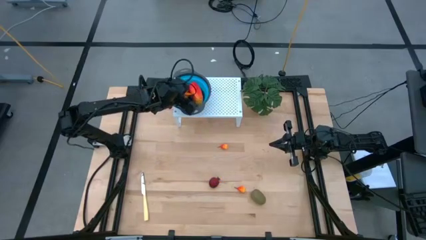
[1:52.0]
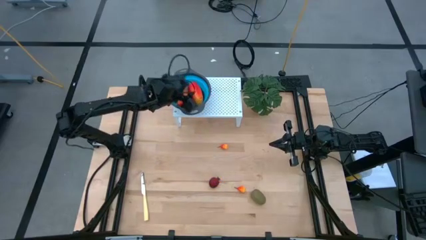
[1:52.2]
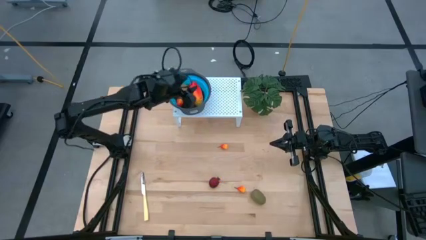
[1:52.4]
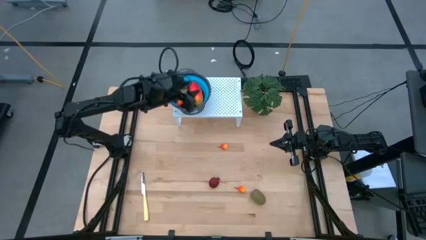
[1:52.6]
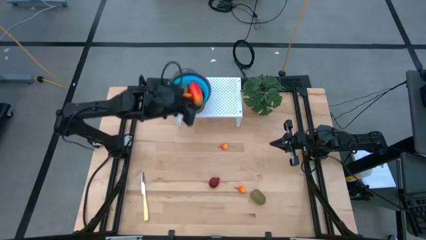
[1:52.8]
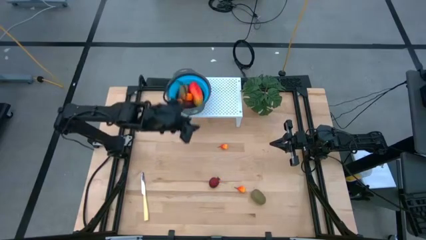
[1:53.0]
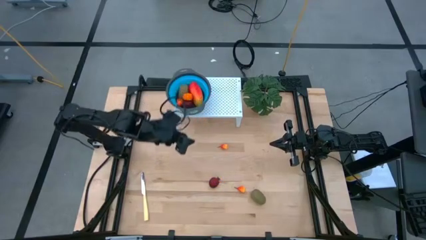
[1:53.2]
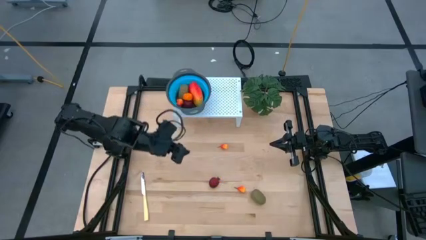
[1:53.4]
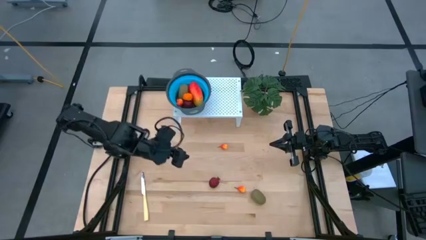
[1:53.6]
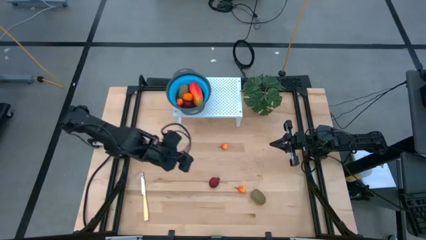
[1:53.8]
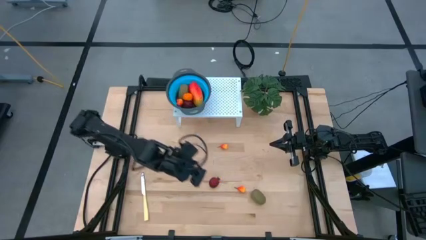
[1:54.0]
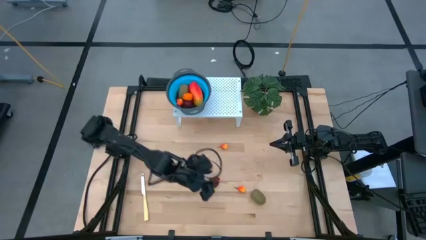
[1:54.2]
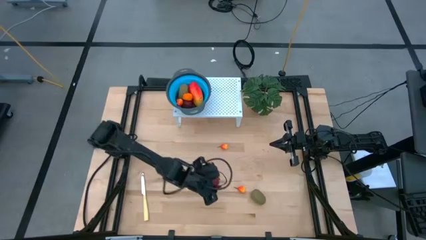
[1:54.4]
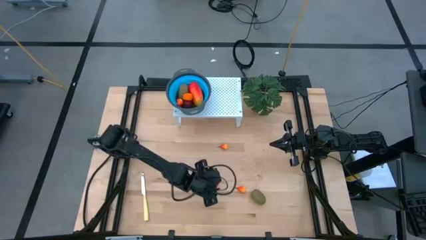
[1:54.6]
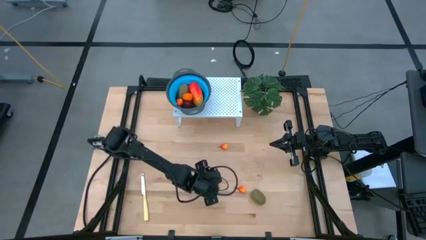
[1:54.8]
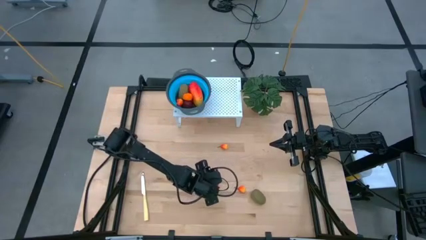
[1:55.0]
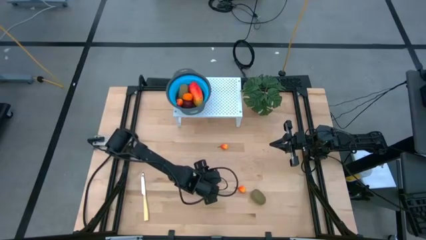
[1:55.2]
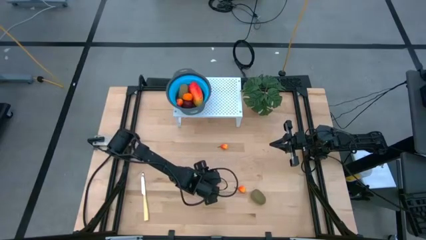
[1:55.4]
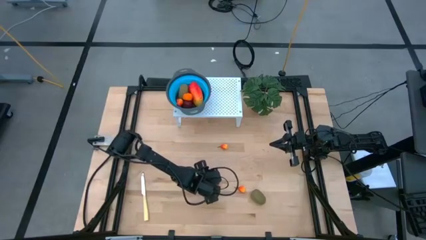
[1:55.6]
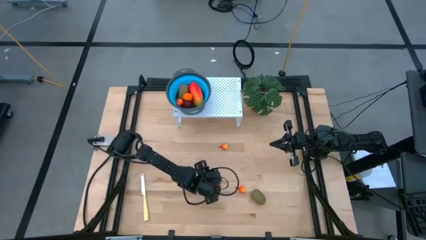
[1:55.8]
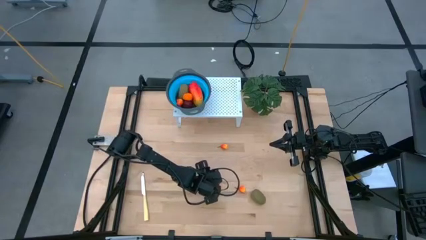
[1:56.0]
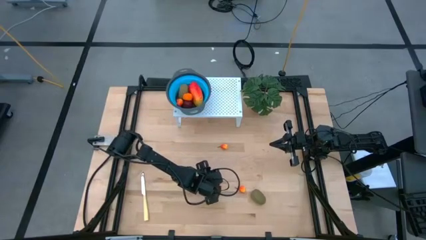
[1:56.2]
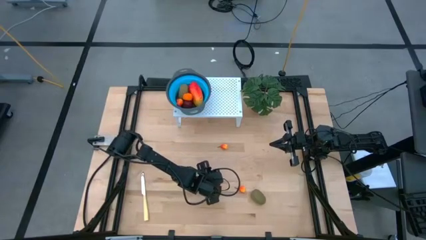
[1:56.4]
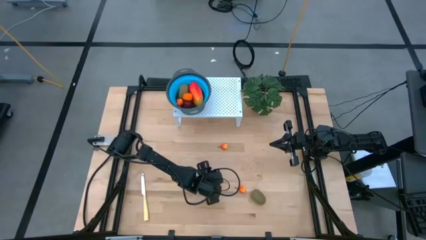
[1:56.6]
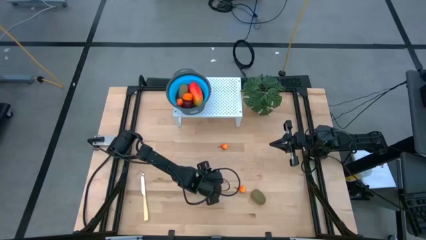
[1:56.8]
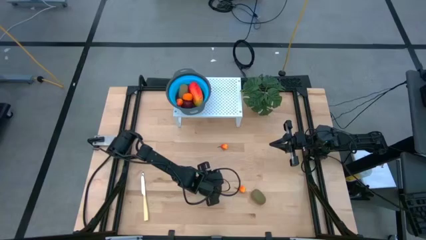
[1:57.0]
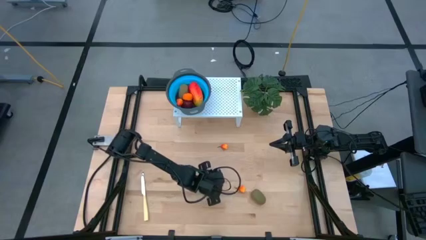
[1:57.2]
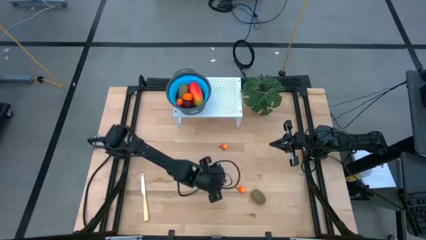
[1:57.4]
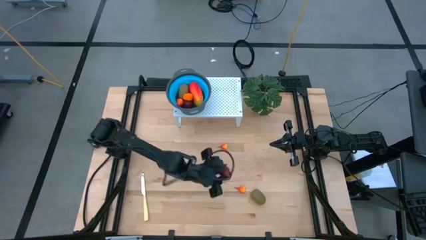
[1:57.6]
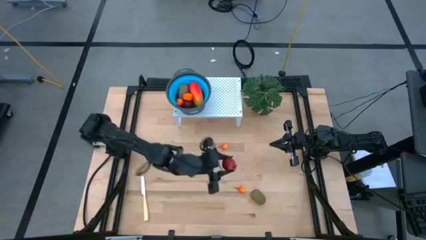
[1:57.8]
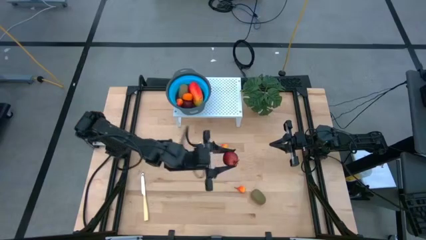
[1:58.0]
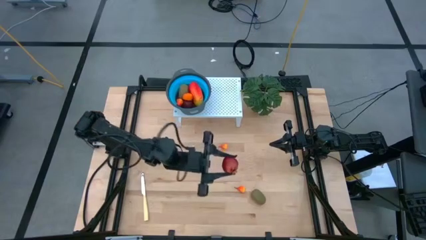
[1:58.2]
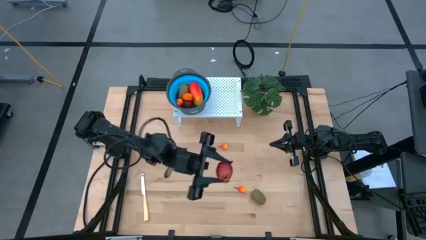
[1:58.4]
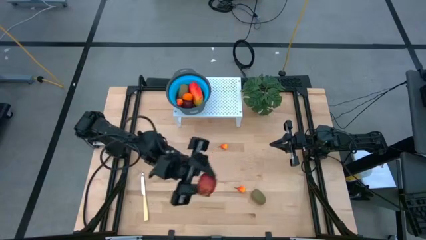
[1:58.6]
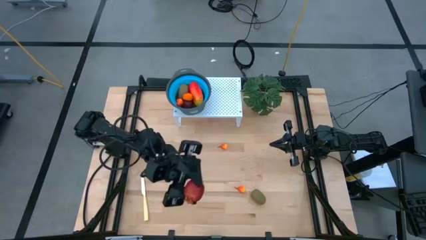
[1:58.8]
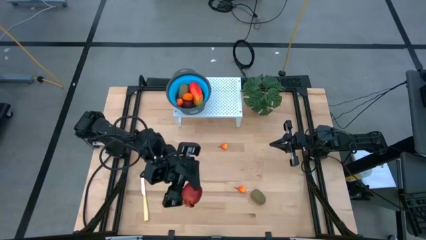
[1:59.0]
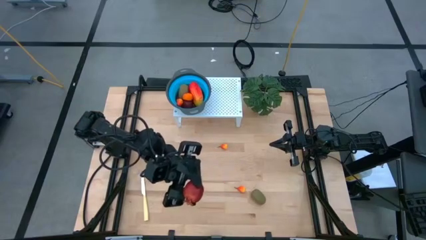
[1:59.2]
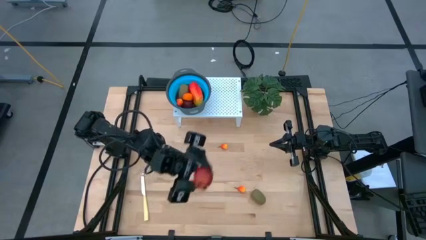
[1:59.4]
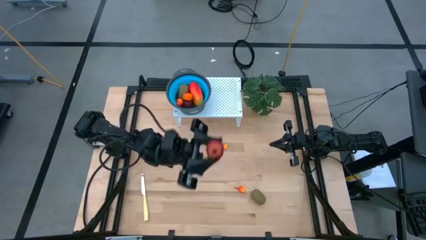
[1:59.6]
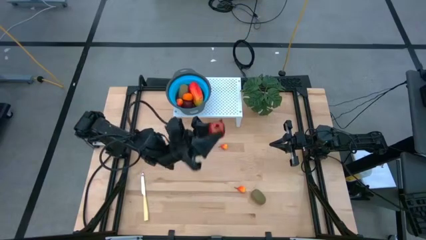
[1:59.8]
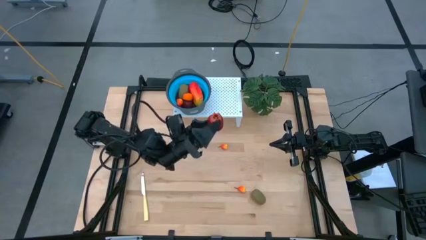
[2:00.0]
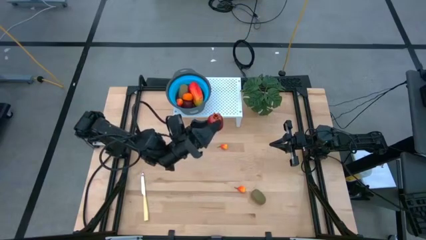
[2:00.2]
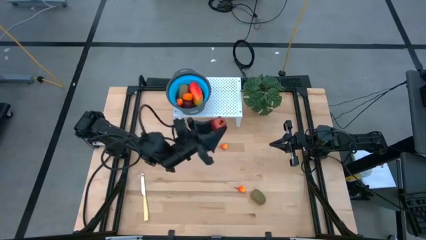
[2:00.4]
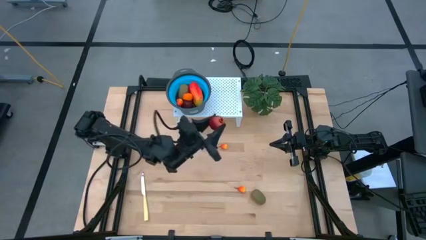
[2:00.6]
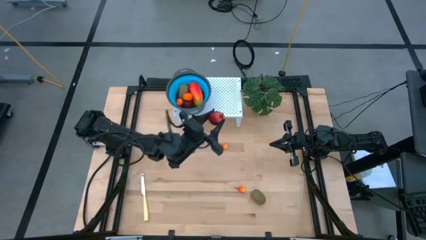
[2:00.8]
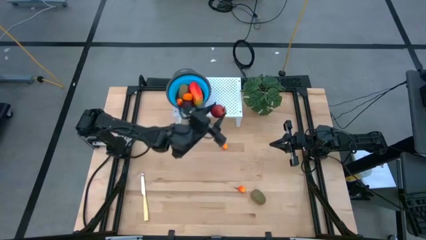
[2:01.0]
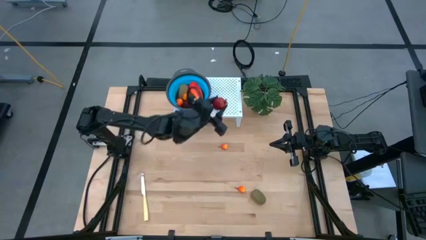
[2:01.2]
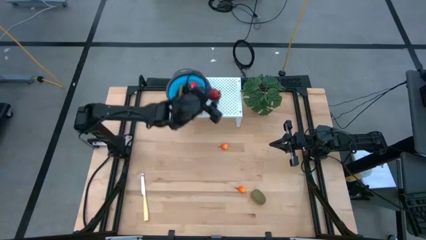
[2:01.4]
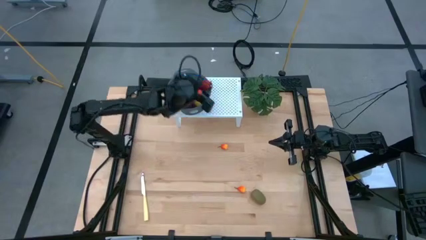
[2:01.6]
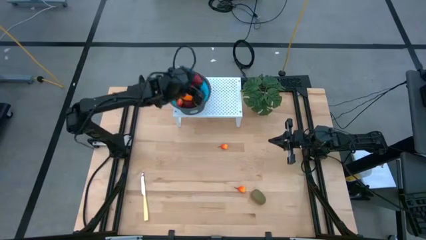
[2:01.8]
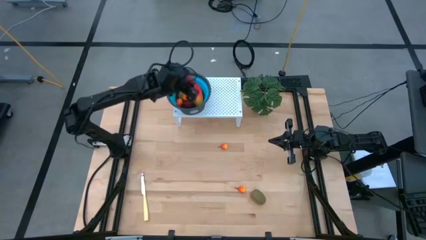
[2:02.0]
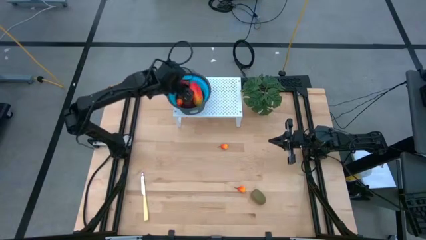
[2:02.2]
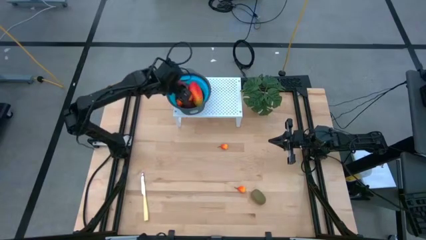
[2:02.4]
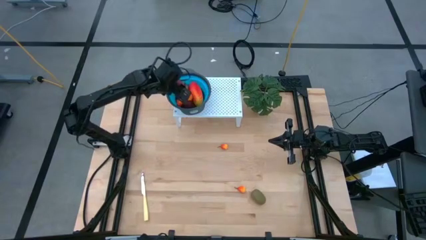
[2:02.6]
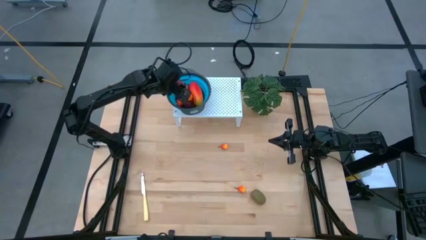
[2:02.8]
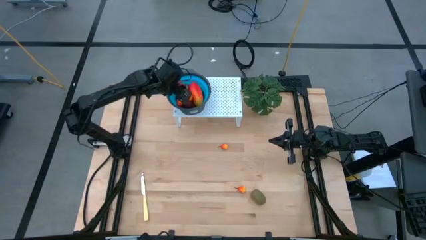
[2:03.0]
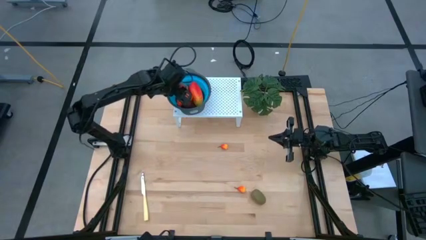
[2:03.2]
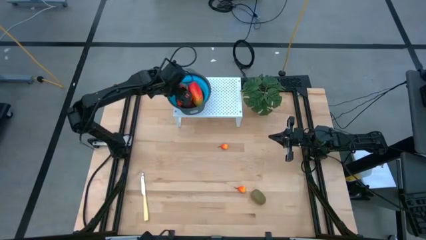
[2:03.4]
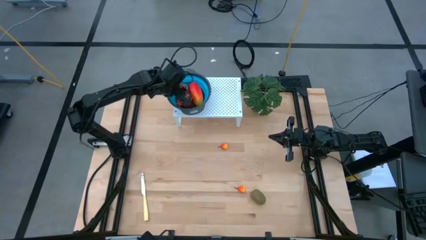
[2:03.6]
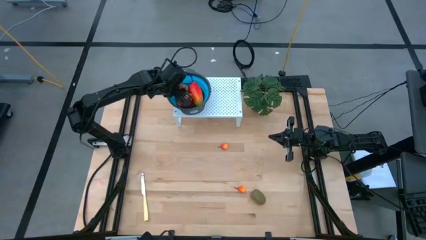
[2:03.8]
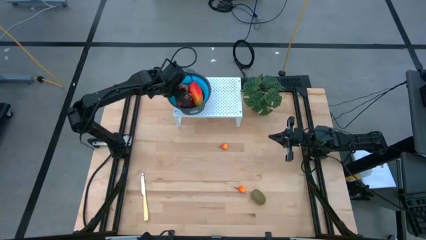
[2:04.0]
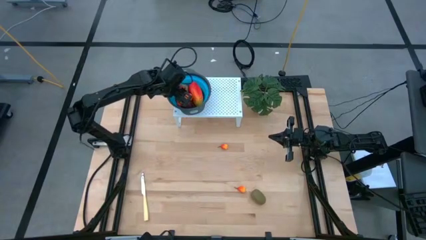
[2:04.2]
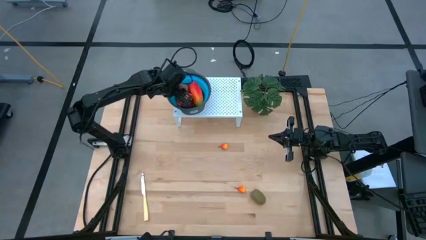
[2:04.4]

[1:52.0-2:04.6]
Task: Pick & Place Fruit
Put the pomegranate in the blue strainer bowl on the shelf

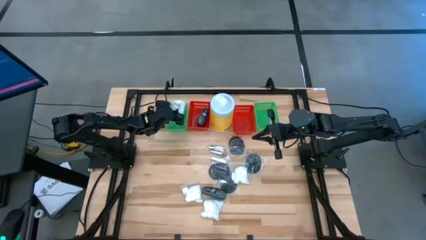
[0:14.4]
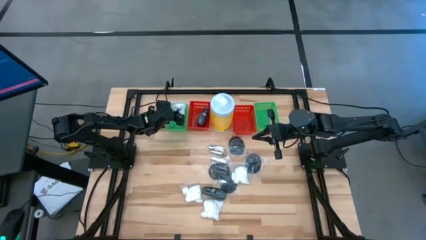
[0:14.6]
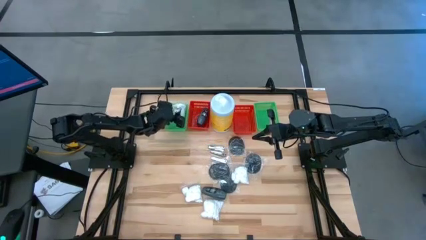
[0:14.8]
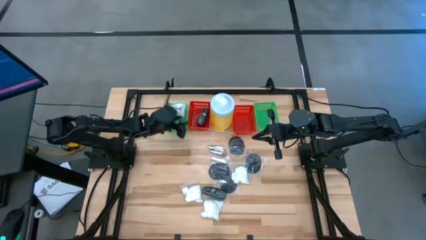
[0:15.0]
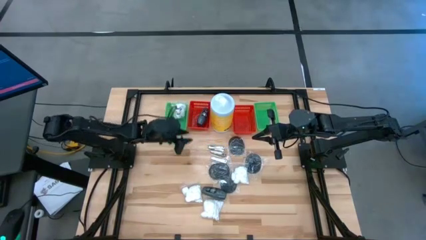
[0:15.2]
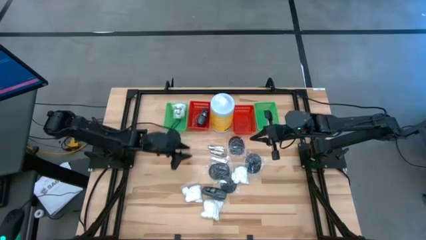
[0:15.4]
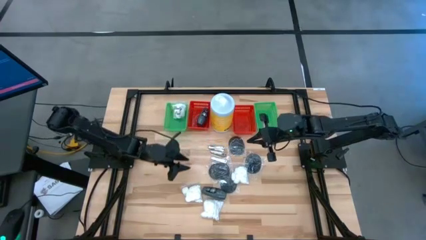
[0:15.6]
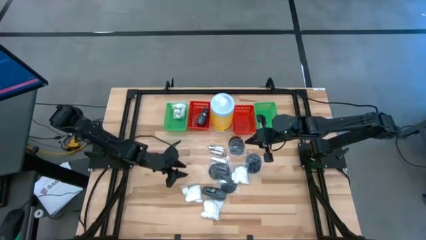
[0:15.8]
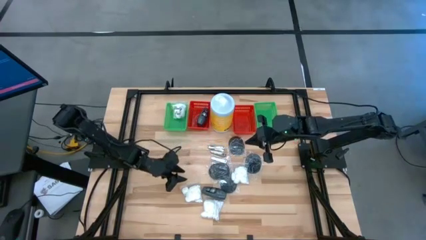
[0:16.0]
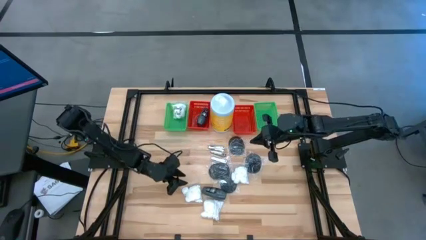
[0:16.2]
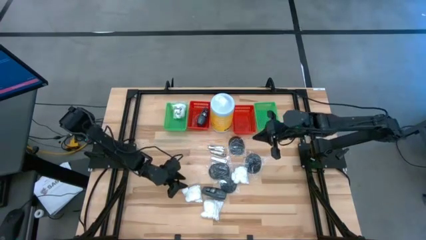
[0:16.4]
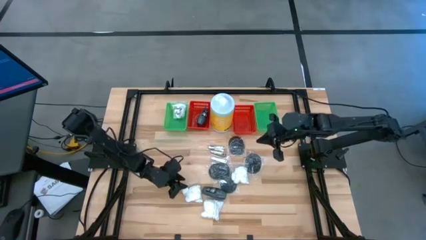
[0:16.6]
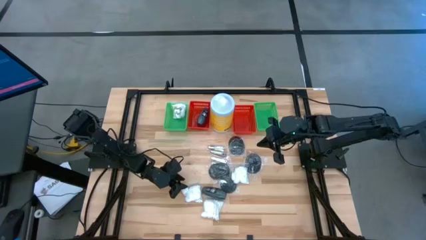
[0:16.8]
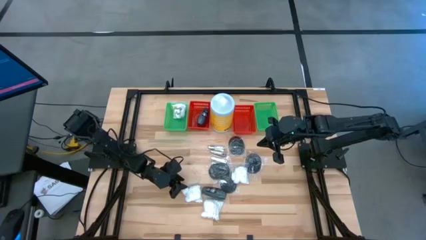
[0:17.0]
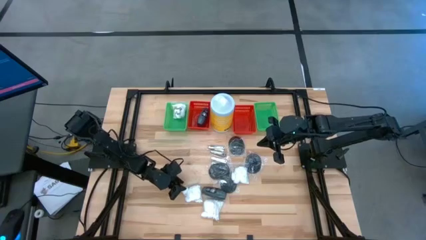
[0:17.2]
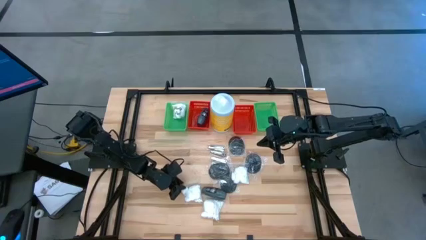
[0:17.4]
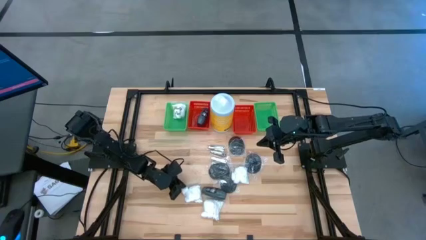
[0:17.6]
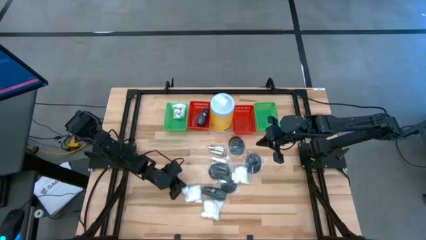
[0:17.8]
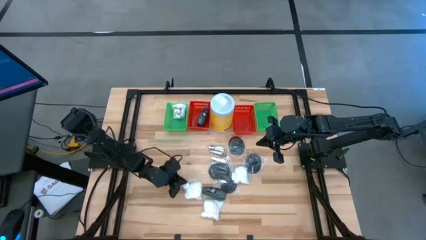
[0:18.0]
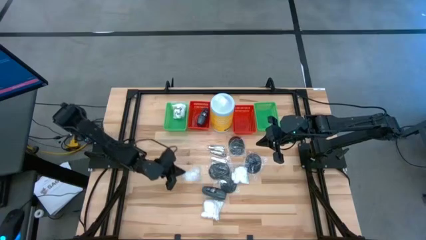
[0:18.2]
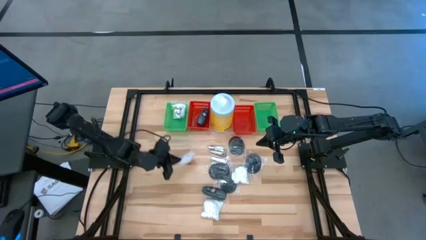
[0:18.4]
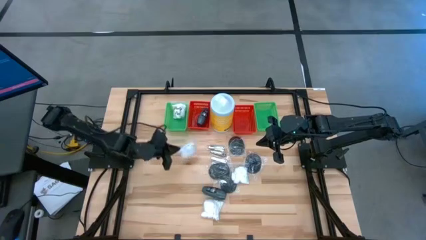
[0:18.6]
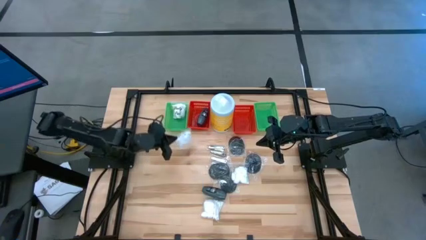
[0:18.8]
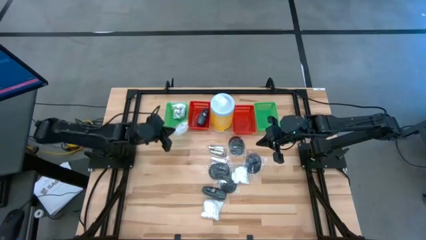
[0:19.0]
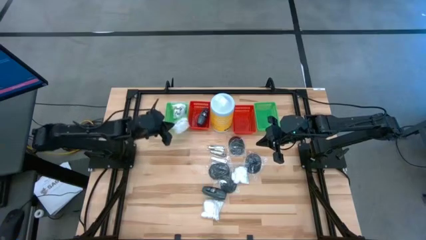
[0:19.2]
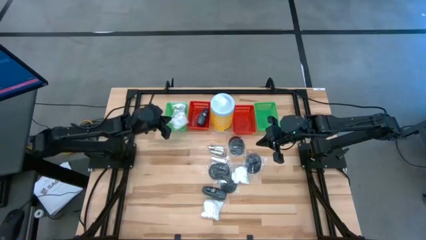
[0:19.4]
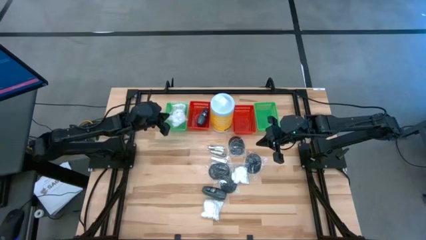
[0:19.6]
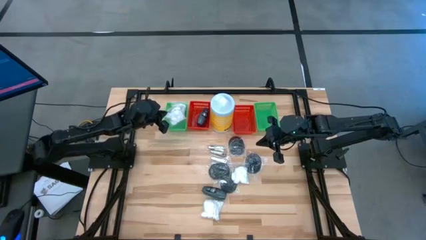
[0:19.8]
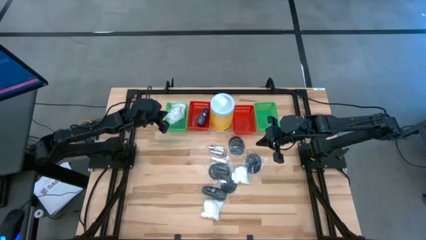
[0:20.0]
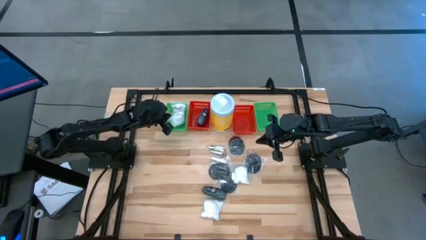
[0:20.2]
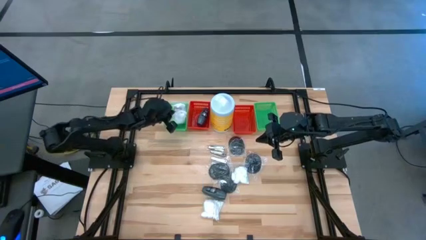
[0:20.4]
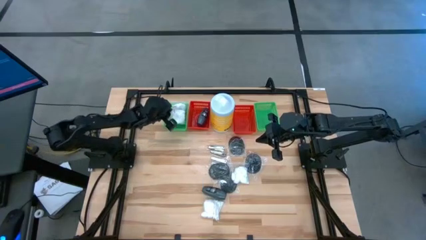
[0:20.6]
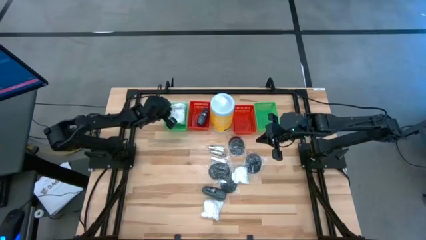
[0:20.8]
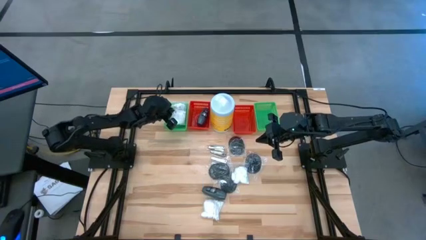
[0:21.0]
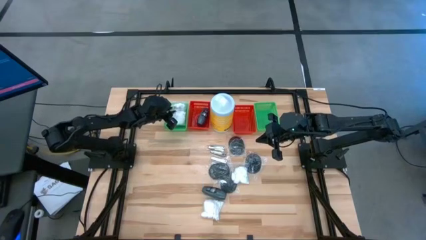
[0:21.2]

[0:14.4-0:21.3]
Task: Pick & Place Travel size toiletries
Put the white cotton pack into the left green bin
